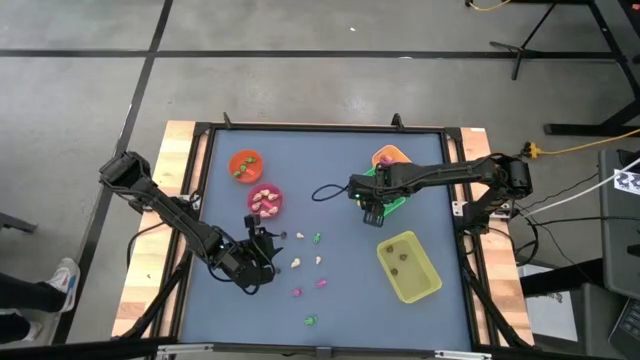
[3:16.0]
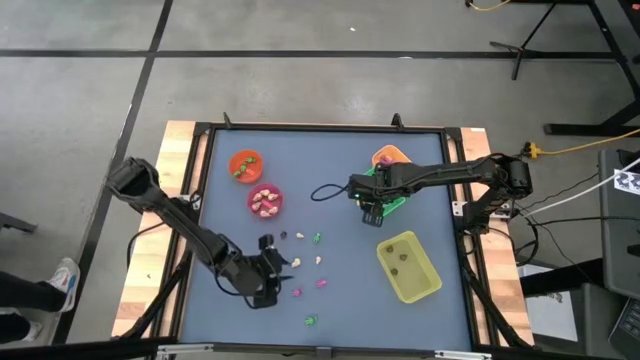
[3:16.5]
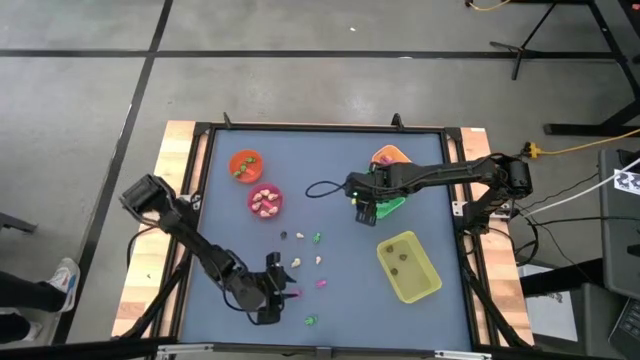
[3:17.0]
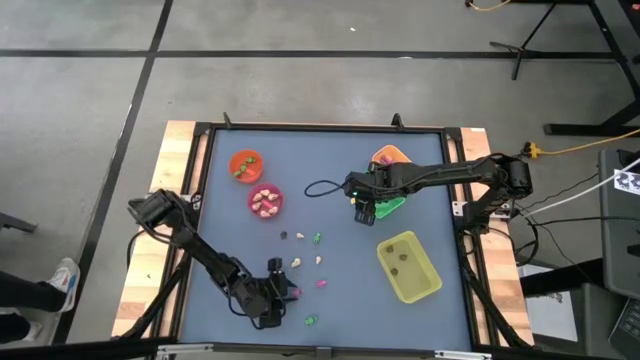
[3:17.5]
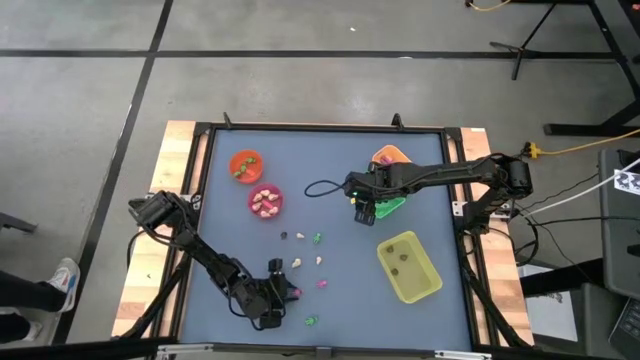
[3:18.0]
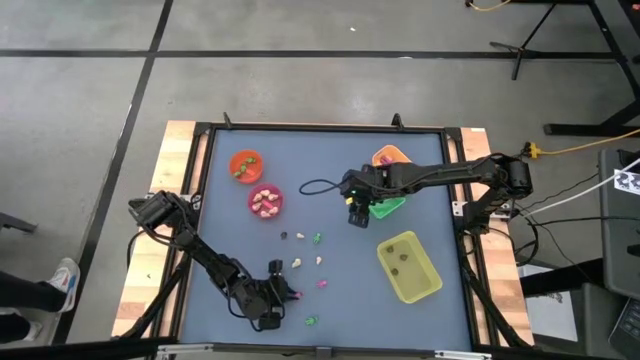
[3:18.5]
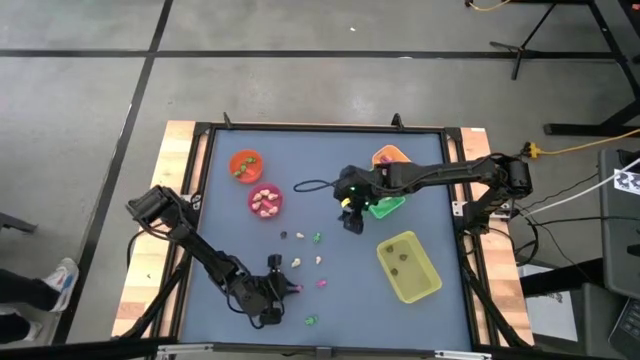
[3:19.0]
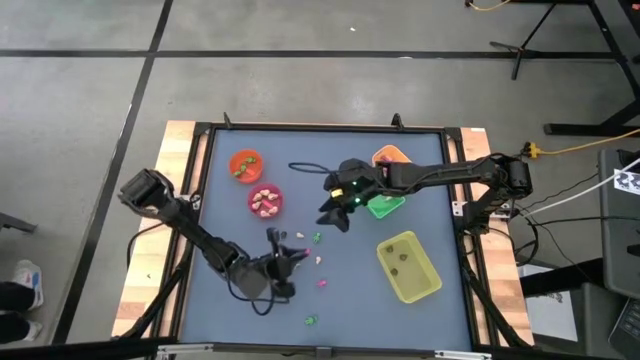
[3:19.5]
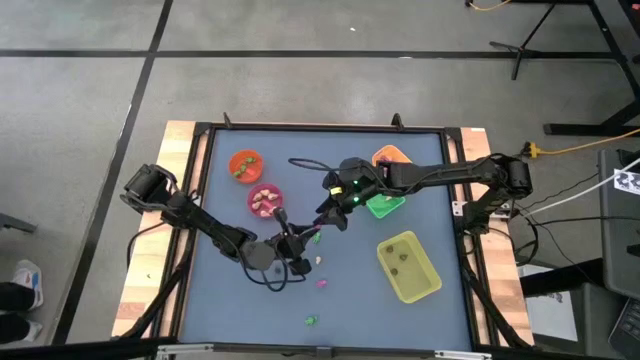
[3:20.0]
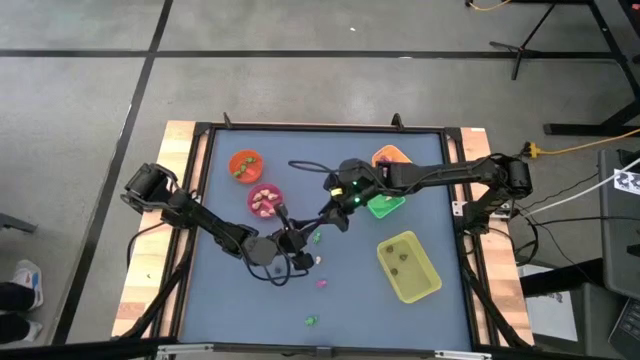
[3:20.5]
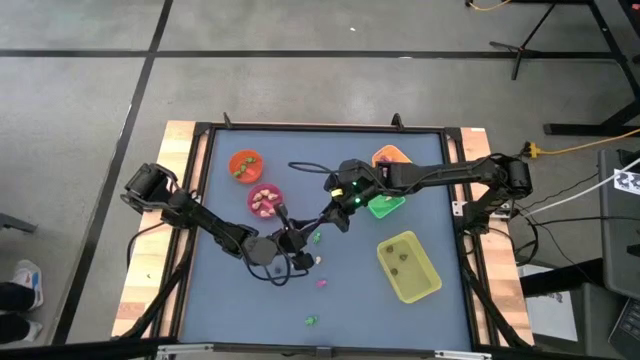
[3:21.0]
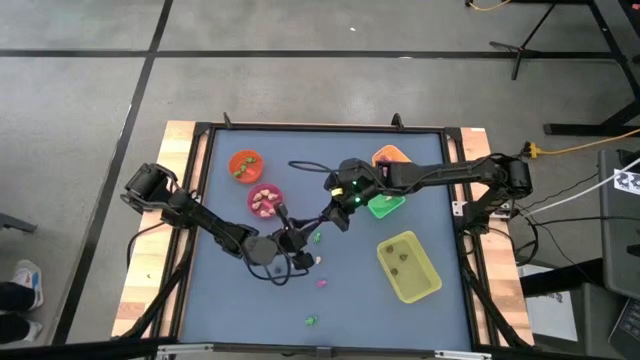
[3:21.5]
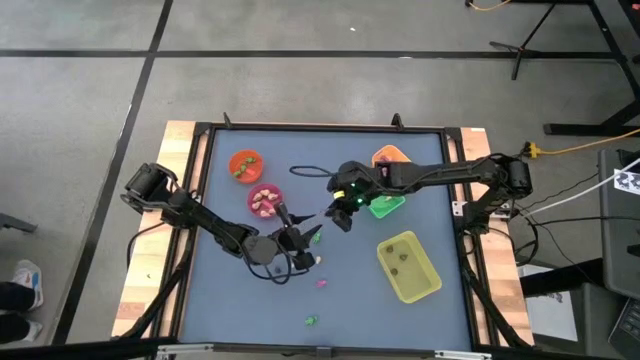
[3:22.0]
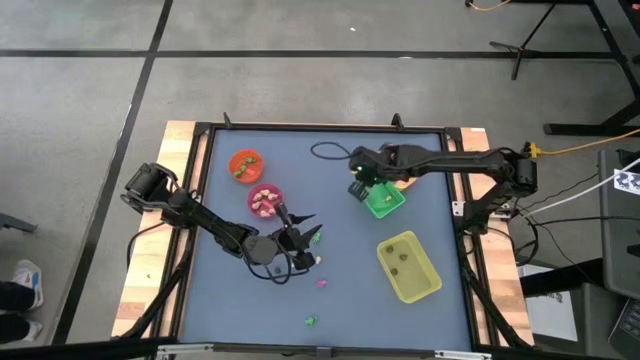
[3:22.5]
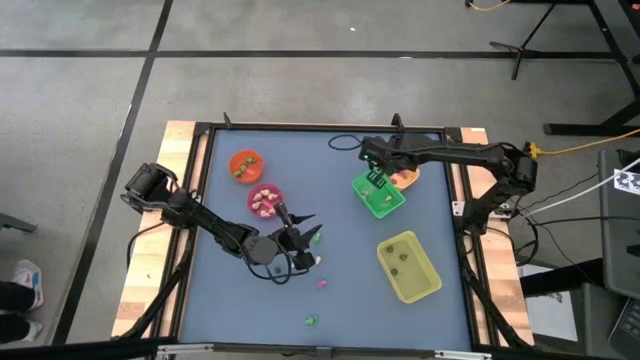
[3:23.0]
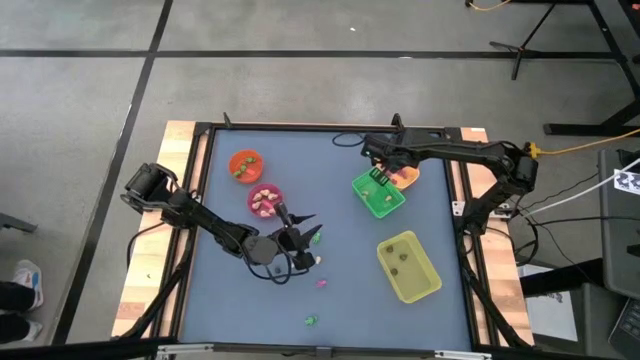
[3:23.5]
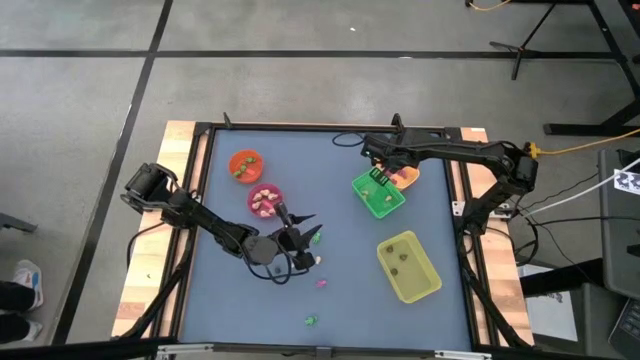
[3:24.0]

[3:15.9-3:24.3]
Task: Sort Halloween decoration
Put the pink skeleton toy into the yellow bin

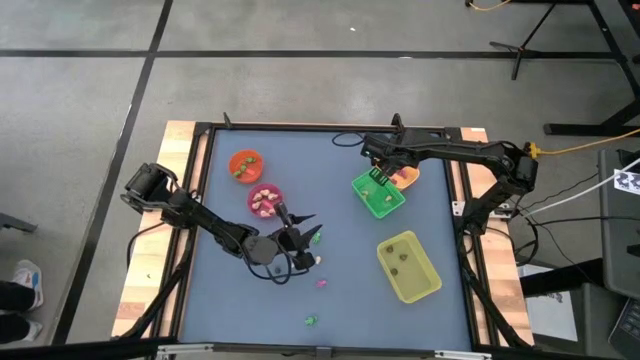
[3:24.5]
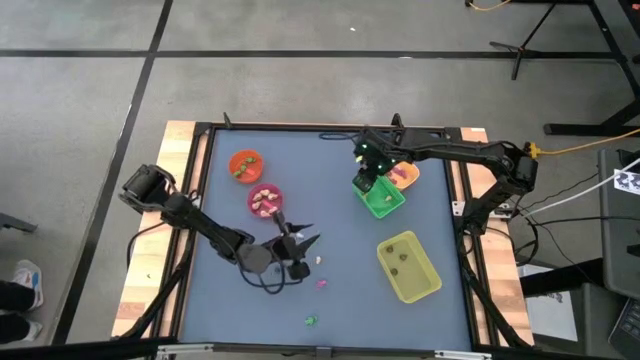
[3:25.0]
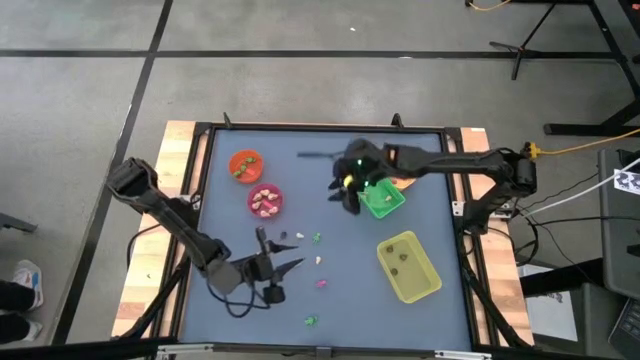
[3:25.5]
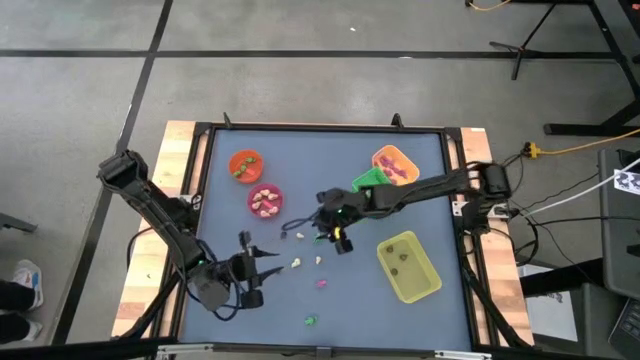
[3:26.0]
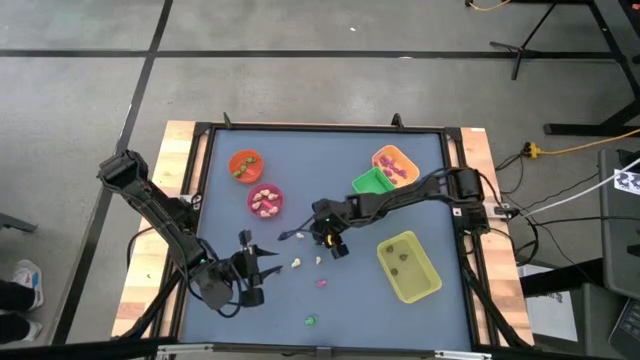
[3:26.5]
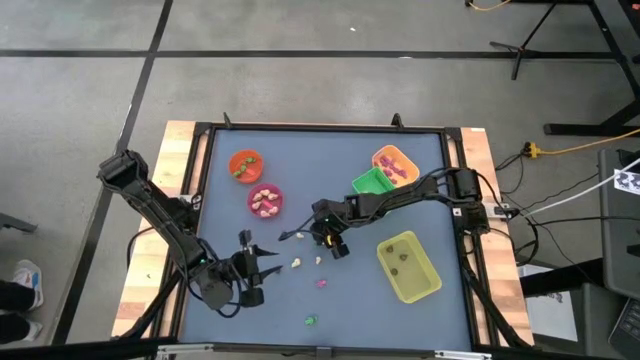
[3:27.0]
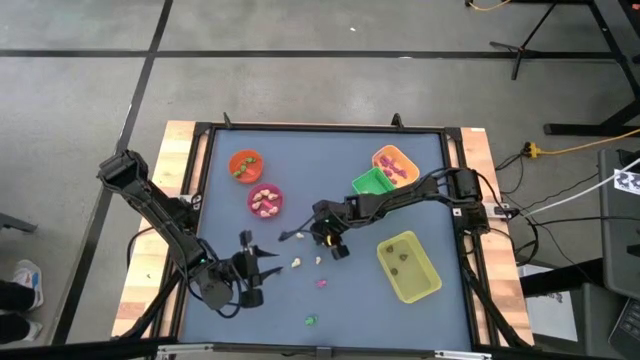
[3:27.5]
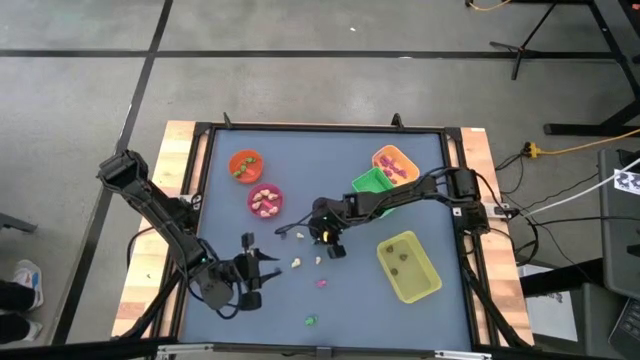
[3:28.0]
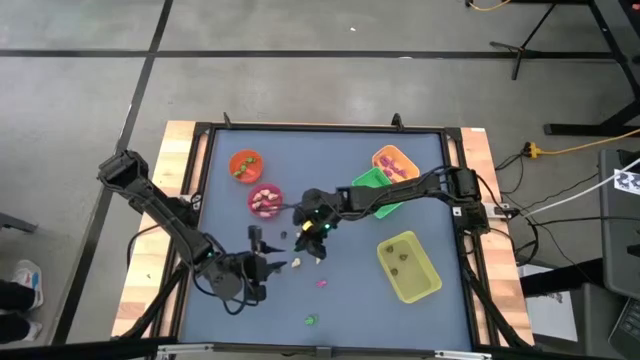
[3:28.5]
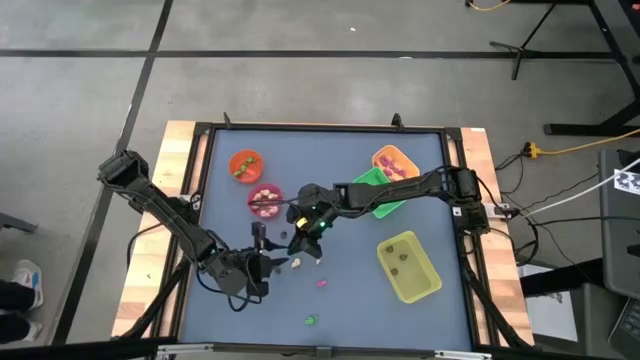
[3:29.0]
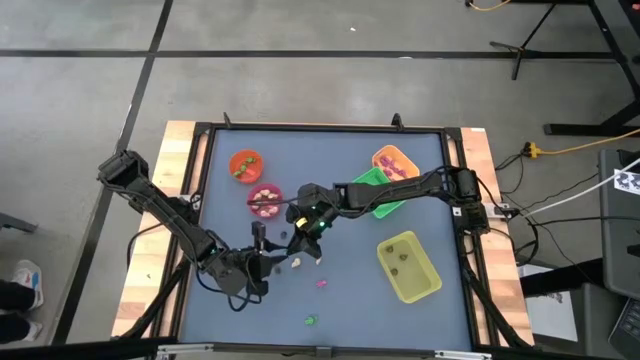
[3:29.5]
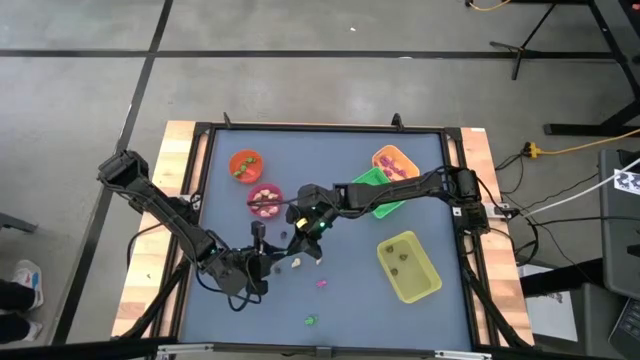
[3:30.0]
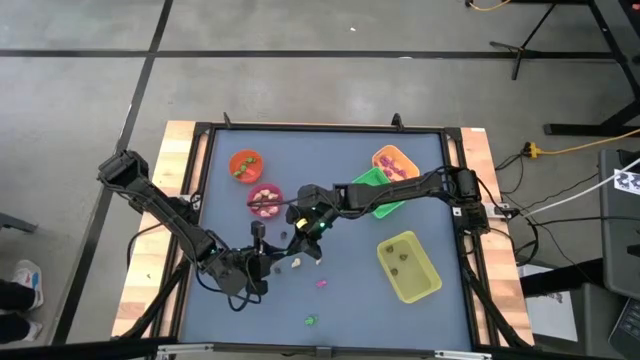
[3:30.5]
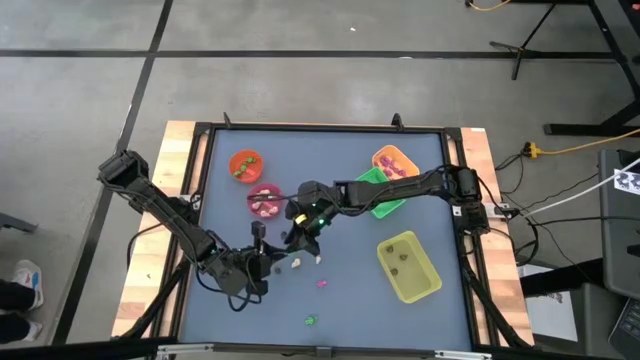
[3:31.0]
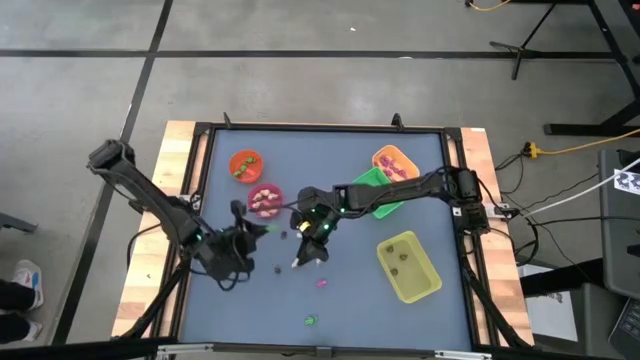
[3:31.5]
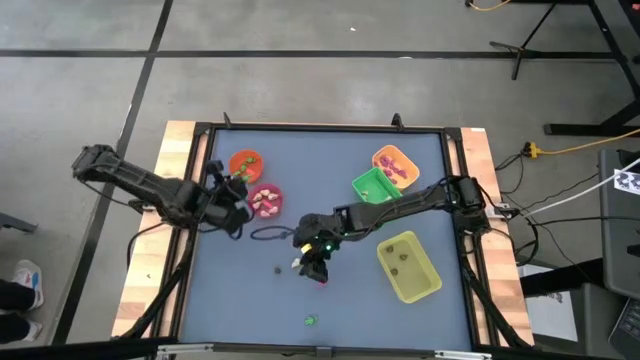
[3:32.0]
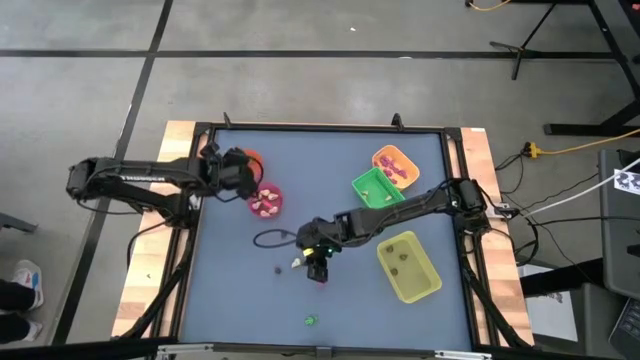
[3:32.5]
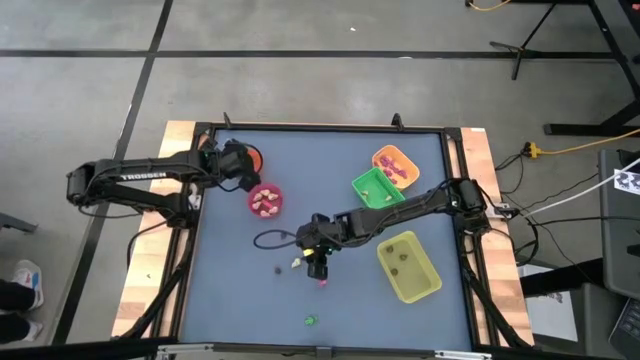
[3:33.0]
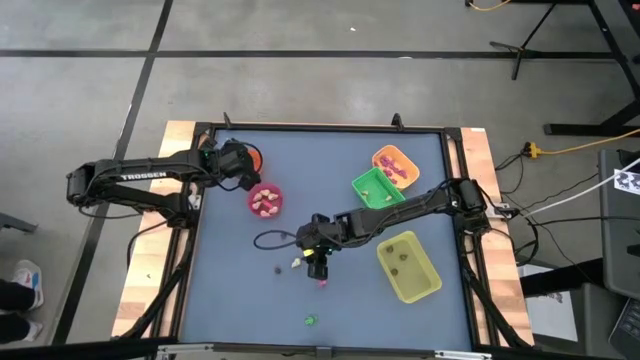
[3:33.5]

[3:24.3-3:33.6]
Put the green skeleton toy into the orange bin

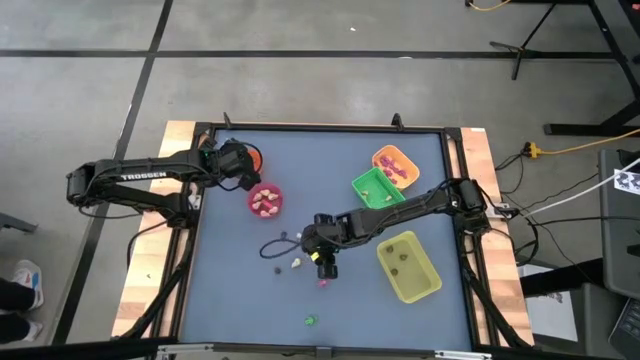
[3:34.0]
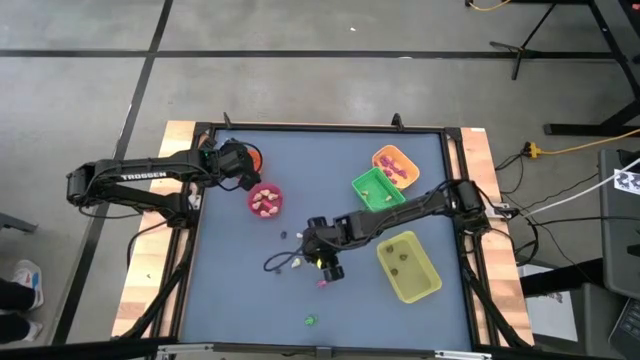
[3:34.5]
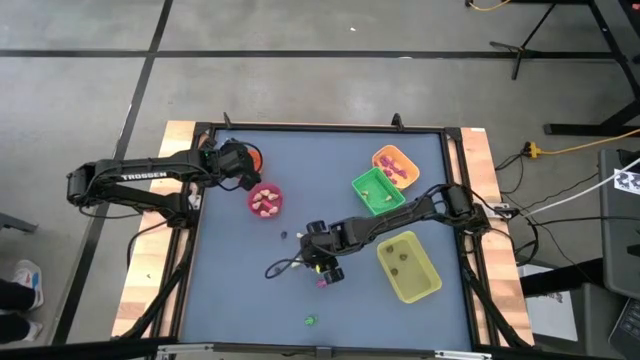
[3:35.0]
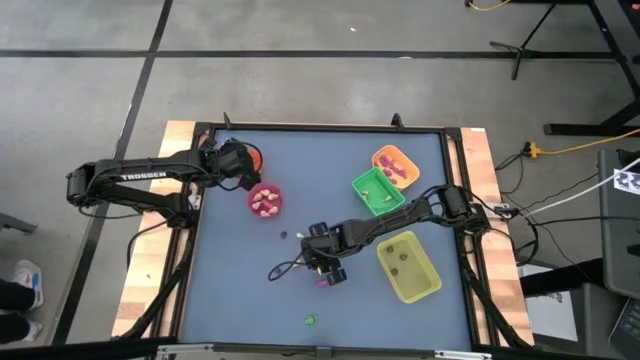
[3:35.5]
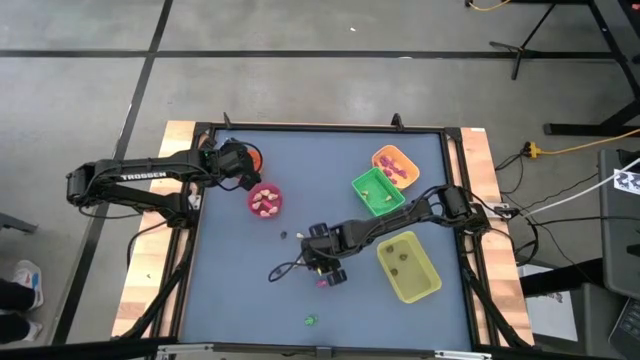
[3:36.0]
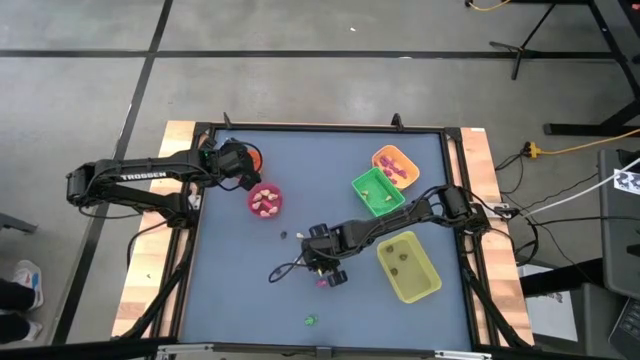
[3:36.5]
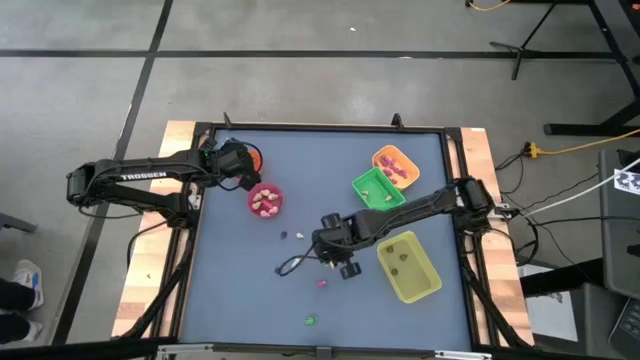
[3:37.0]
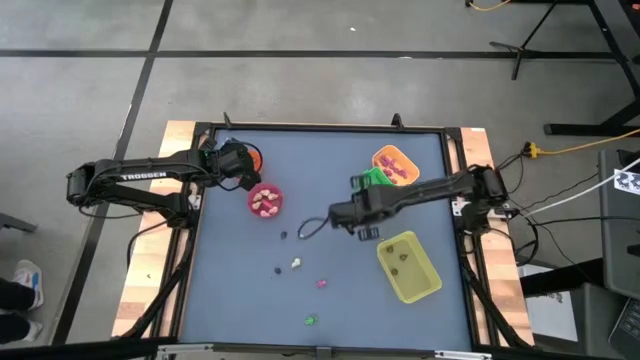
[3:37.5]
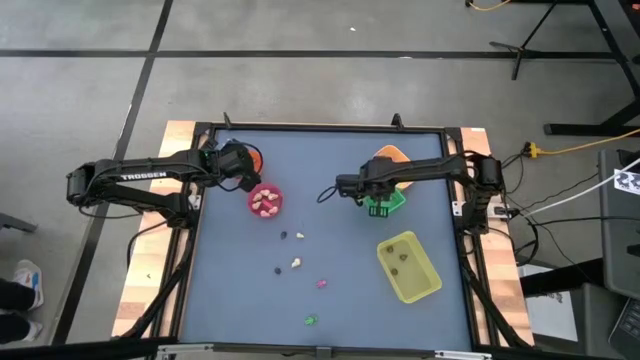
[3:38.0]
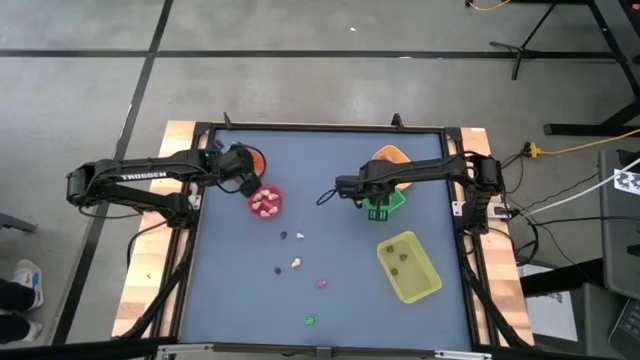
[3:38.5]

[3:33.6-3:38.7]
Put the white skull toy into the green bin
